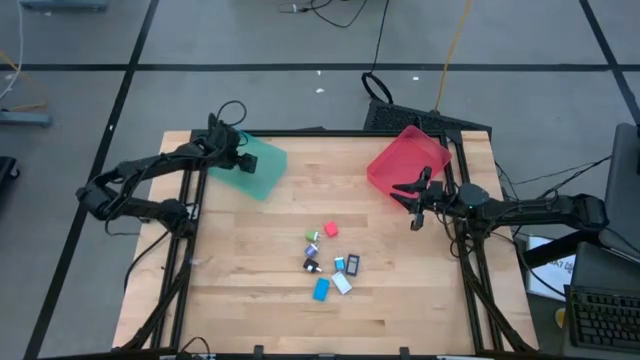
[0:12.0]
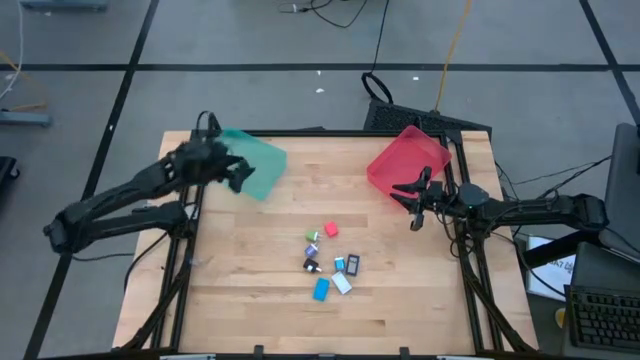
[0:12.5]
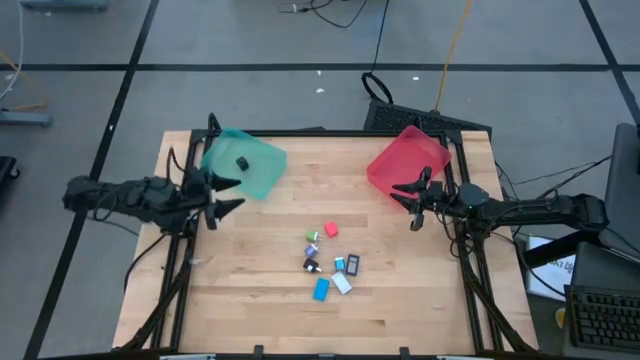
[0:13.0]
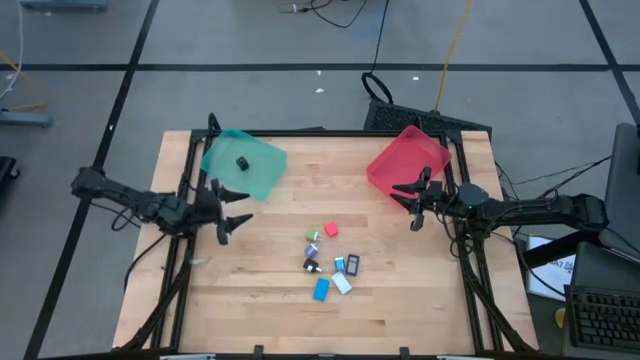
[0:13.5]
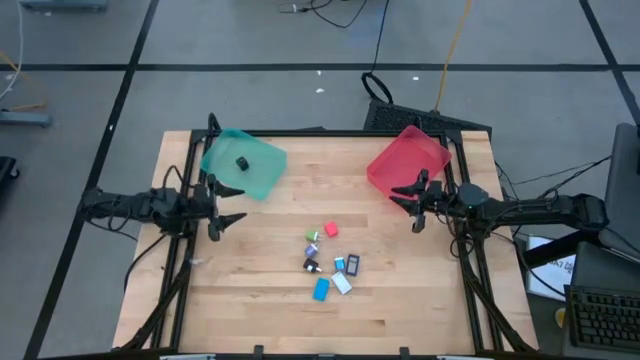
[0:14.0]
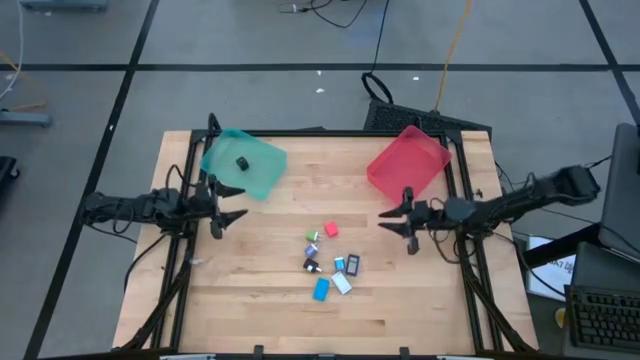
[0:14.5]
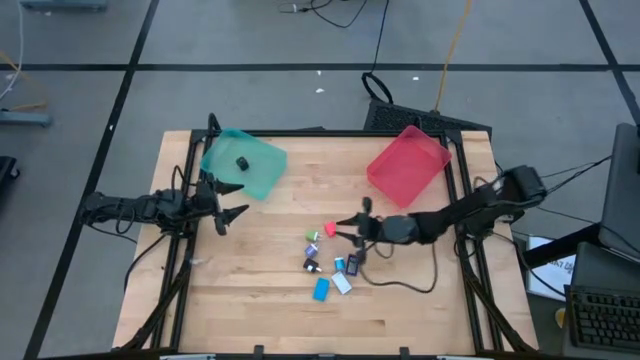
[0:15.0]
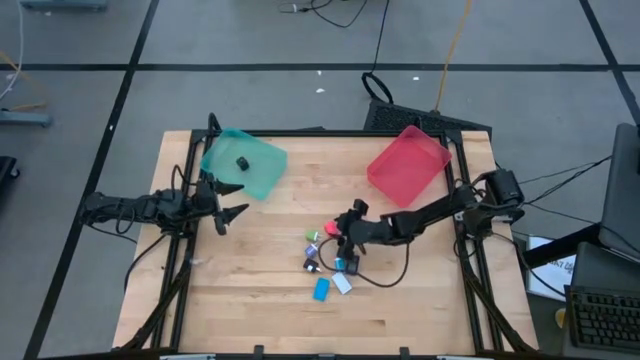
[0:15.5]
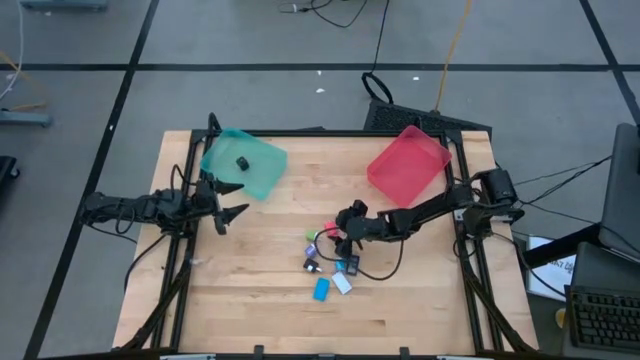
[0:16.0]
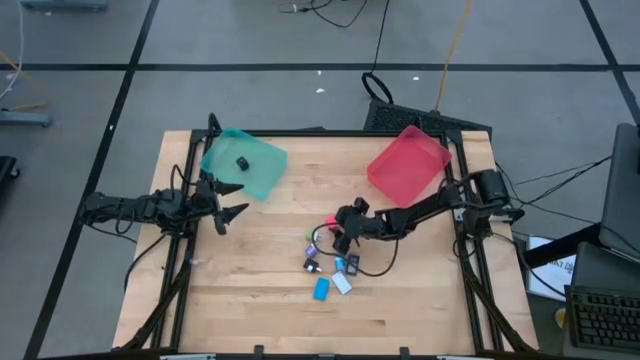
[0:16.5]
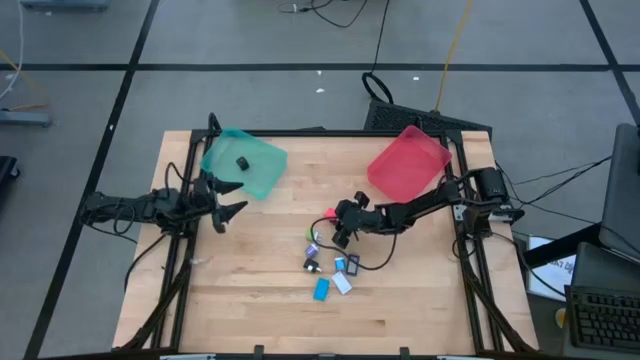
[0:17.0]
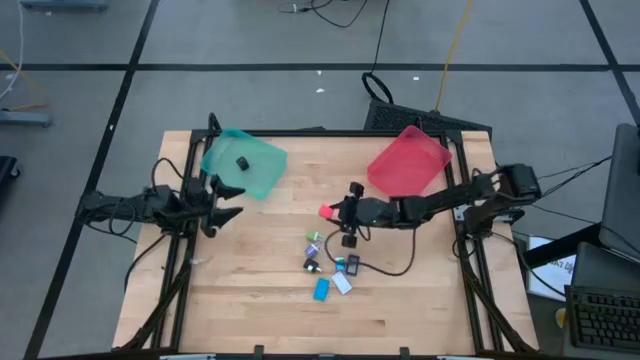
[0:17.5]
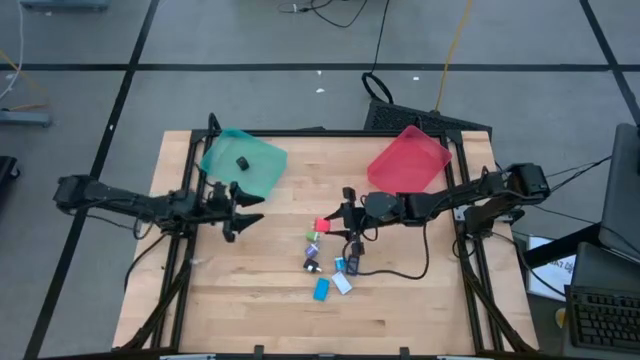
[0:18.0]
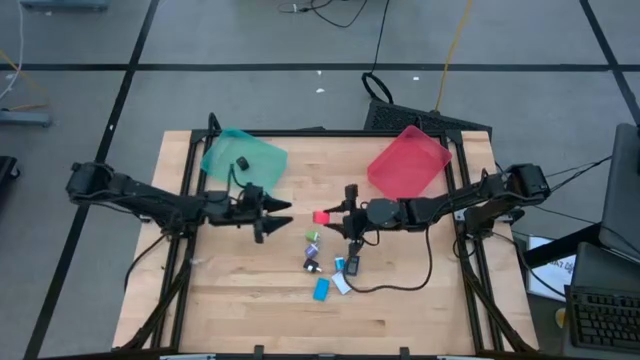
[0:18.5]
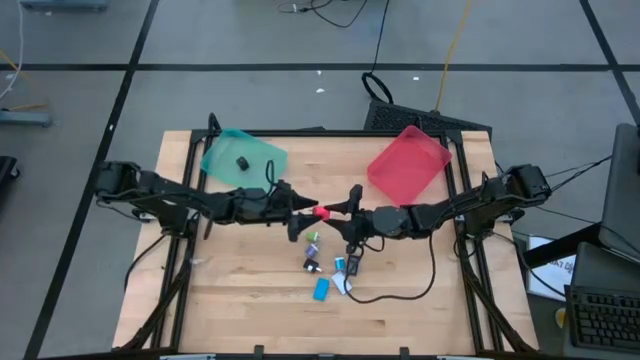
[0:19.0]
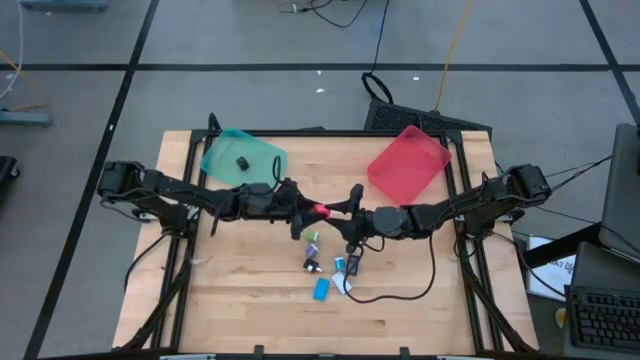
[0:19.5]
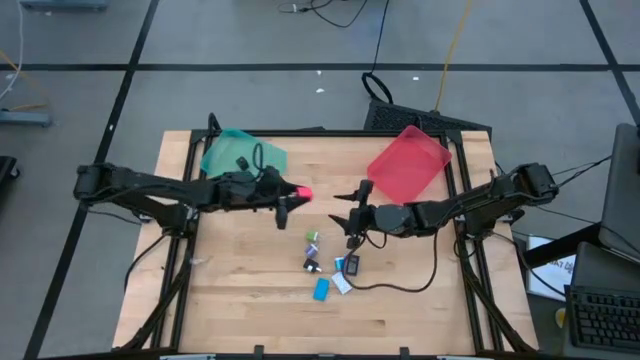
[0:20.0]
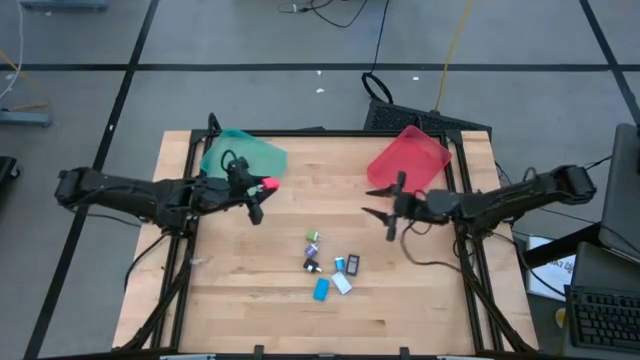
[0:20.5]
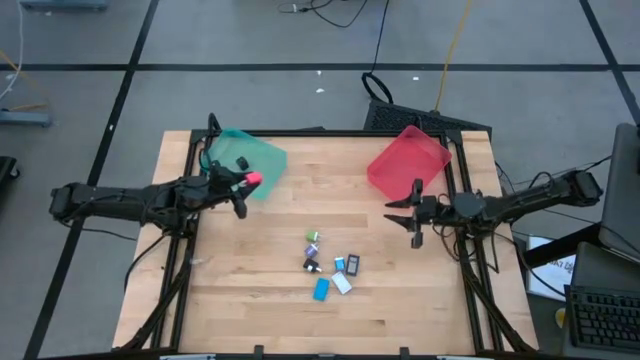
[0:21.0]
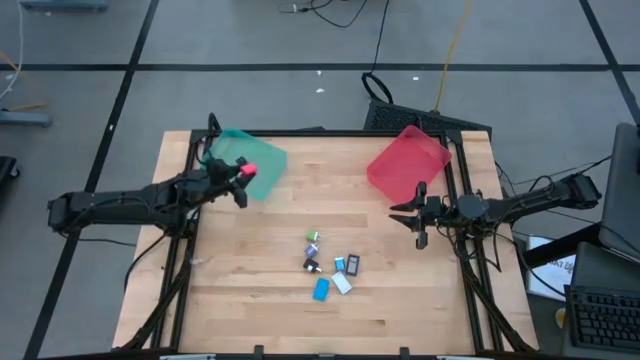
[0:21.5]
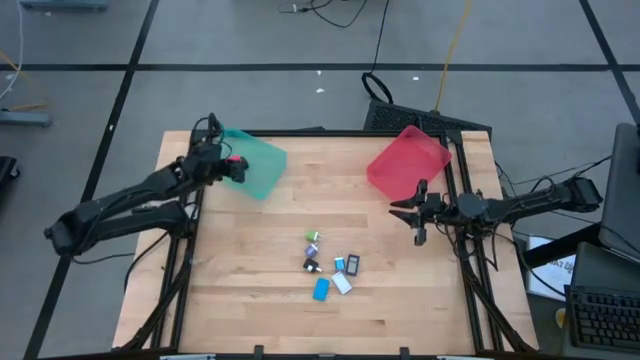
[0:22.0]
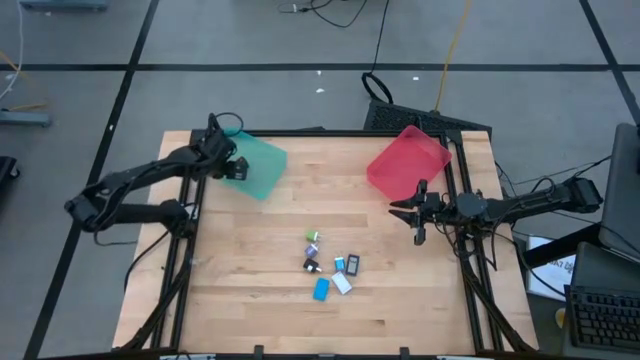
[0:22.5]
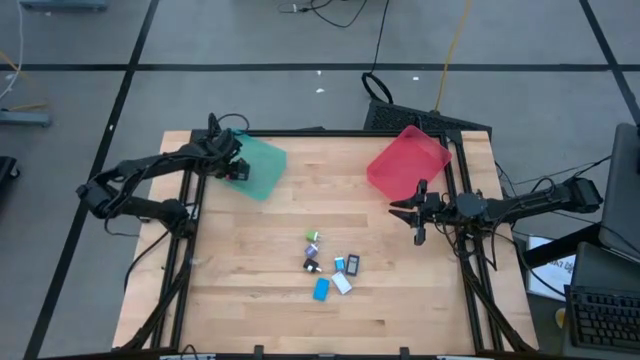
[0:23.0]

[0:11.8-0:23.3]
Task: Pick & Place Office items
Put the pink charger adapter into the blue bin

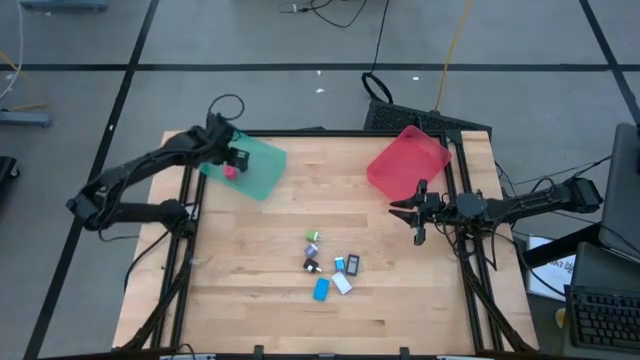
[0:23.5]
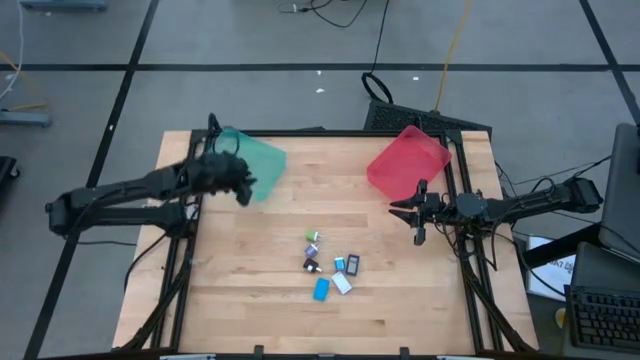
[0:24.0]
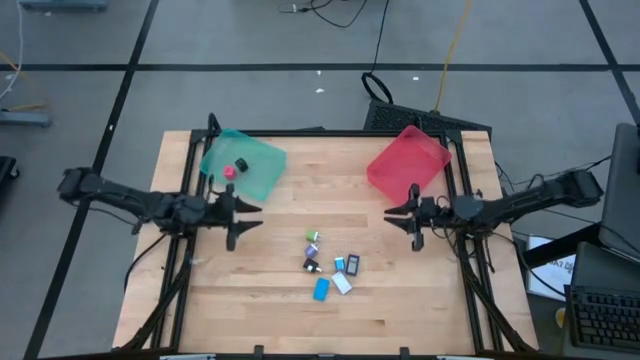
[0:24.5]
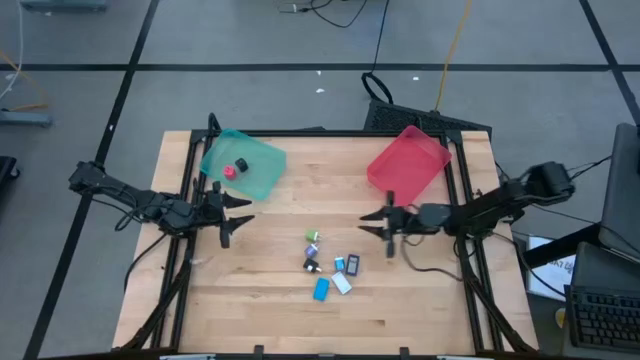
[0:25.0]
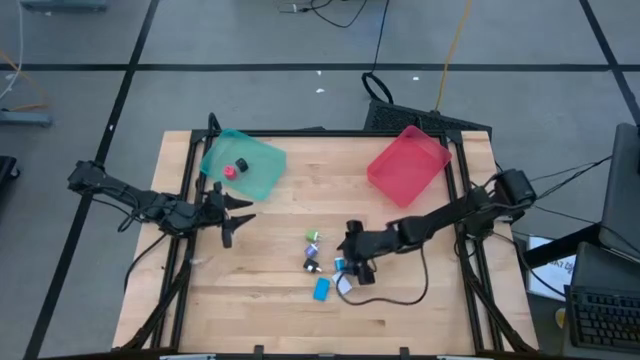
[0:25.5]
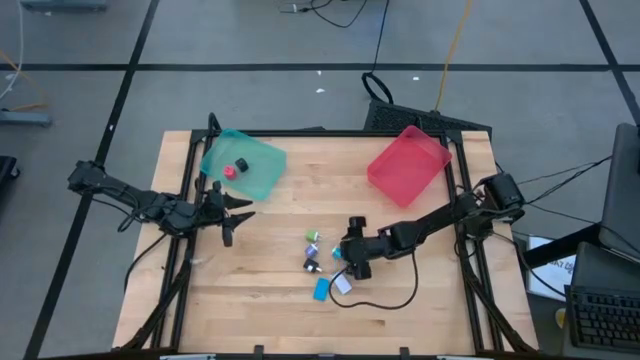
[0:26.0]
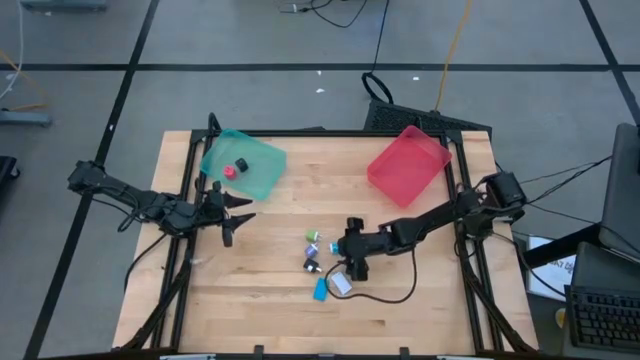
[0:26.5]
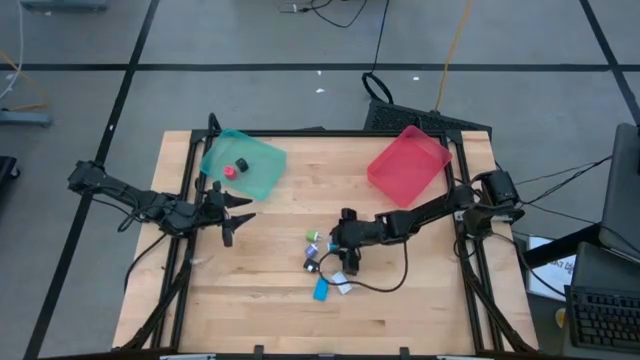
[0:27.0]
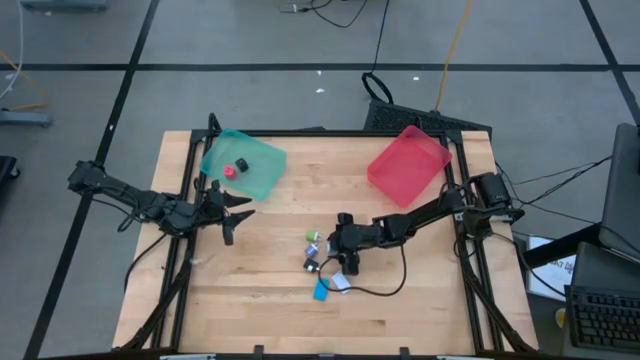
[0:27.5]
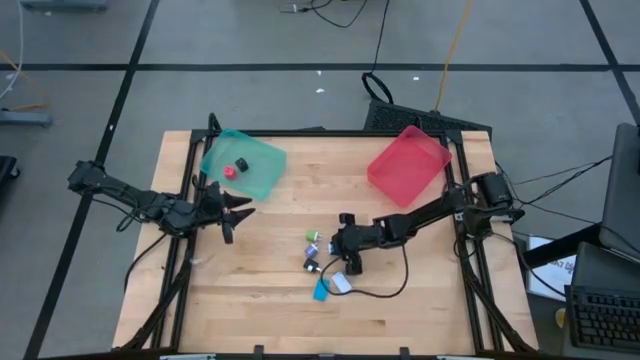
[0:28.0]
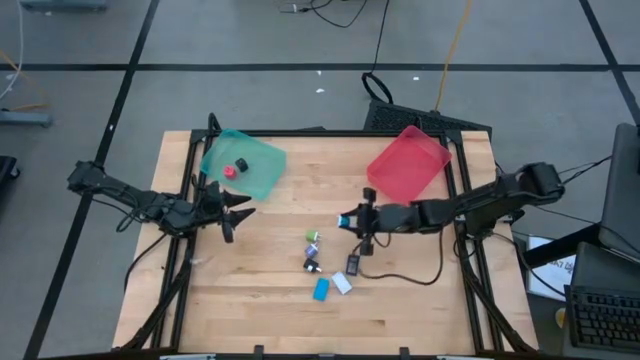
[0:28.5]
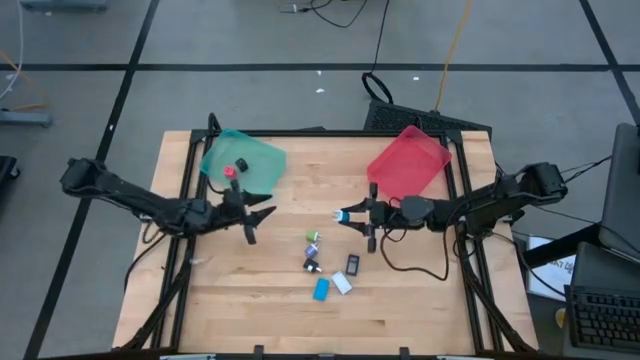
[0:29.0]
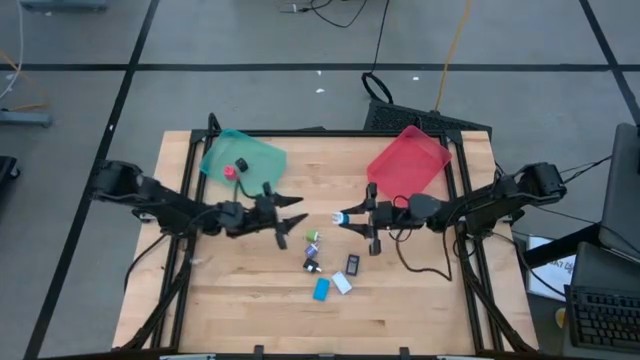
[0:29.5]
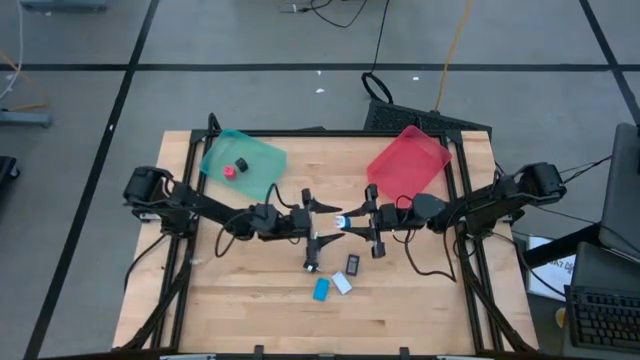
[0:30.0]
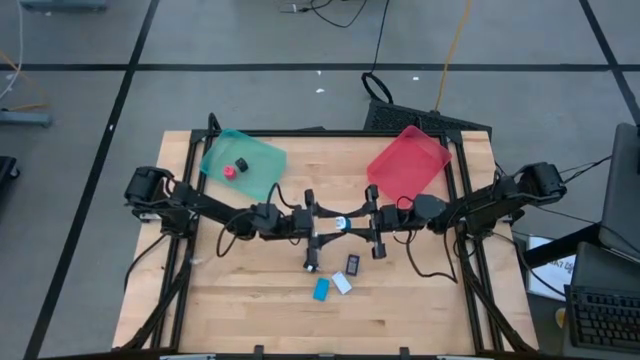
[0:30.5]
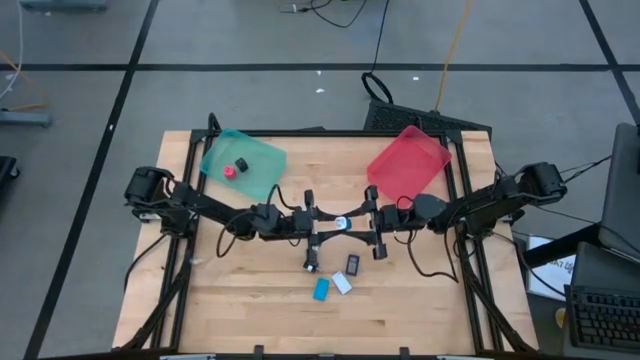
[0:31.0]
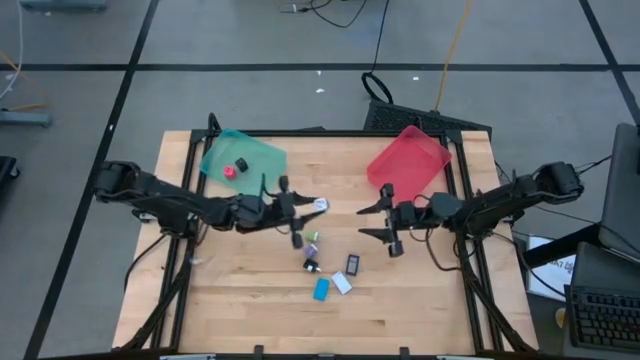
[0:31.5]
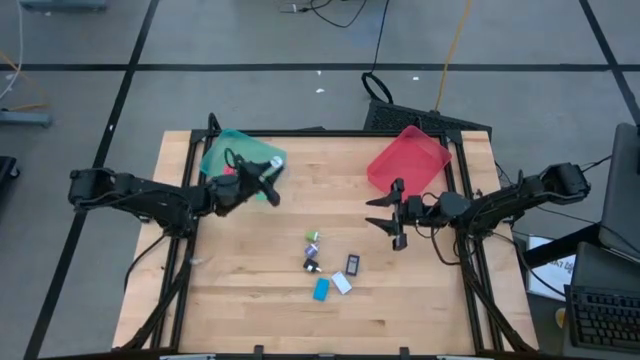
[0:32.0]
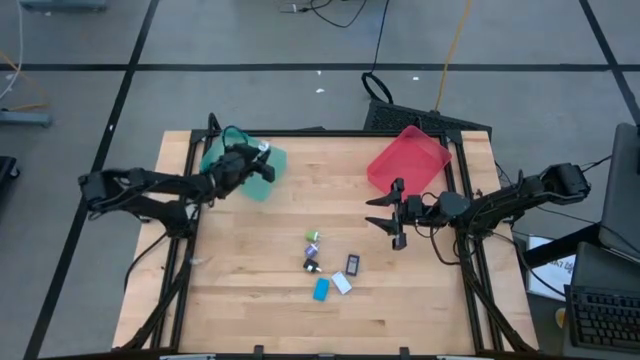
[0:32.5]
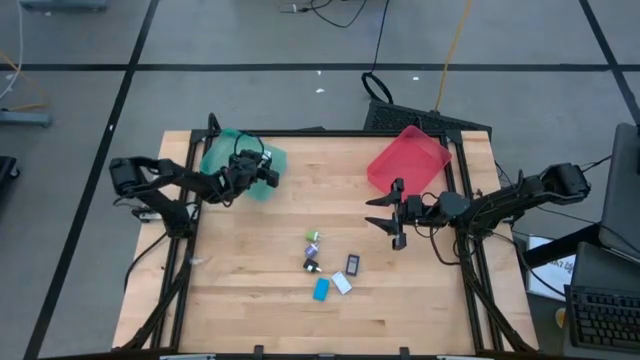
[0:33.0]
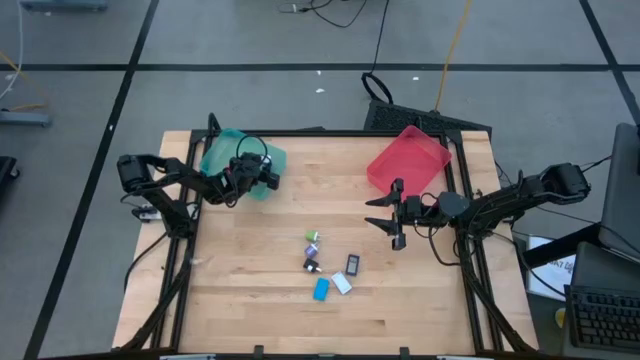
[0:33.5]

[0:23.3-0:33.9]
Put the blue charger adapter into the blue bin
